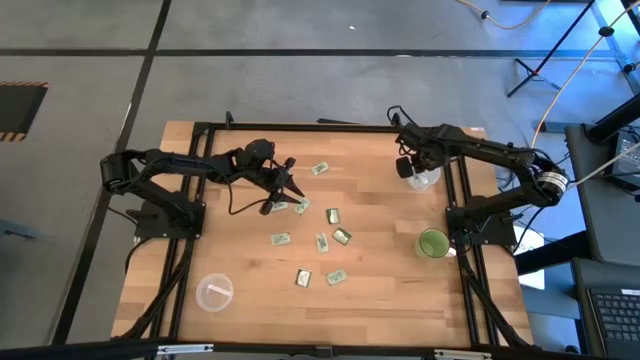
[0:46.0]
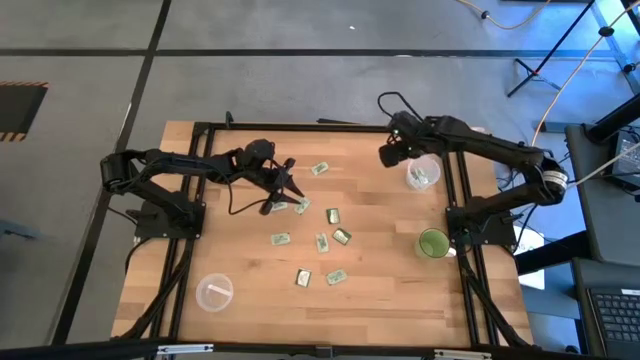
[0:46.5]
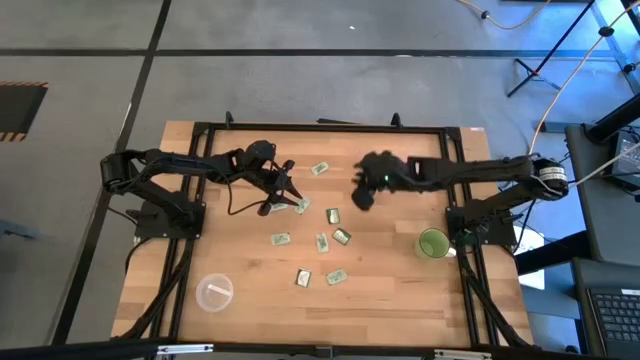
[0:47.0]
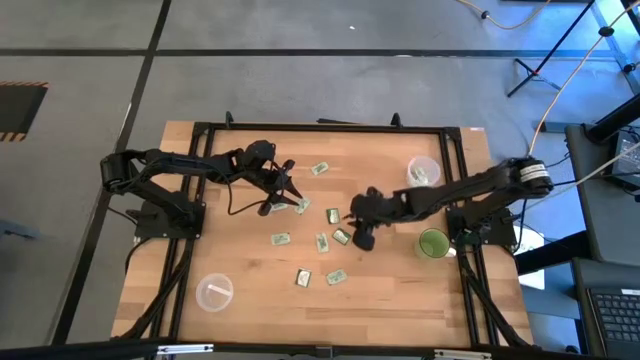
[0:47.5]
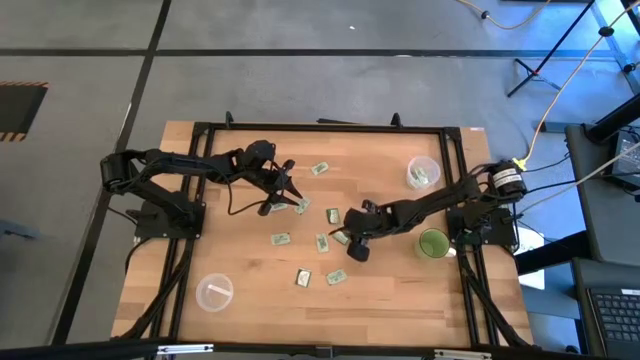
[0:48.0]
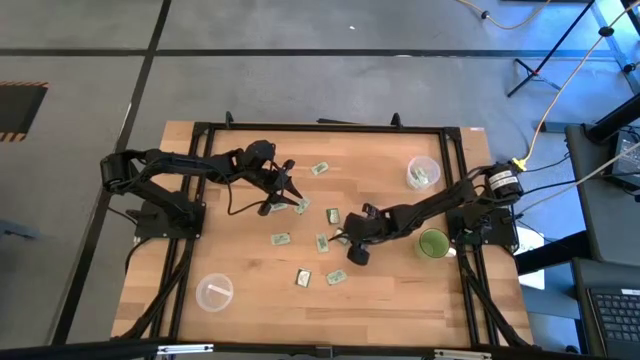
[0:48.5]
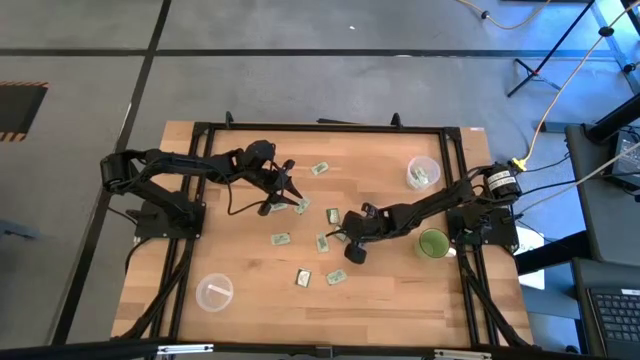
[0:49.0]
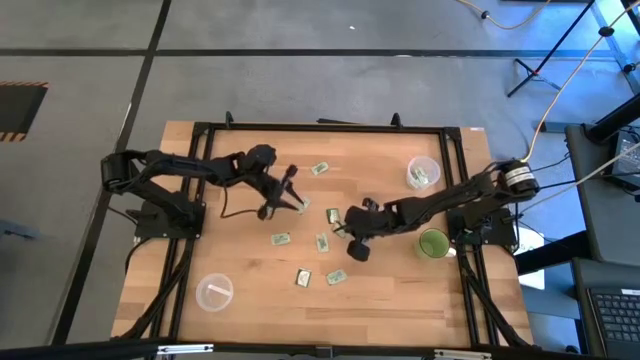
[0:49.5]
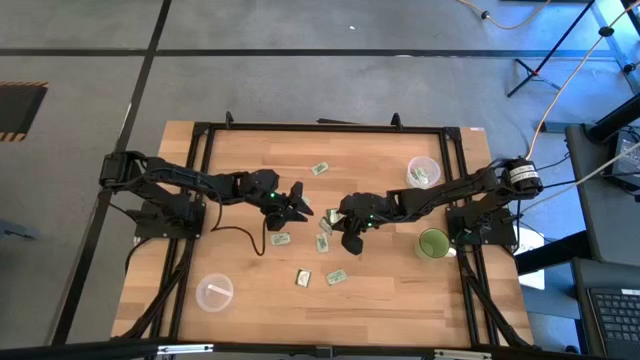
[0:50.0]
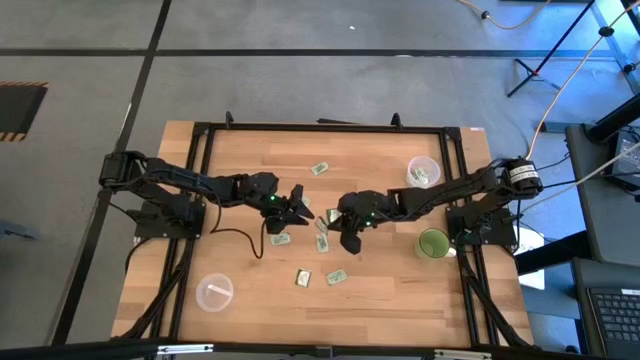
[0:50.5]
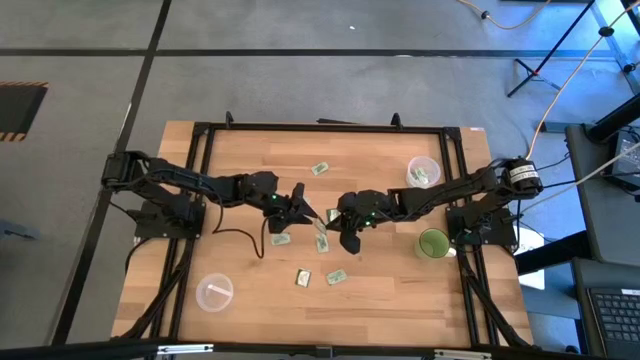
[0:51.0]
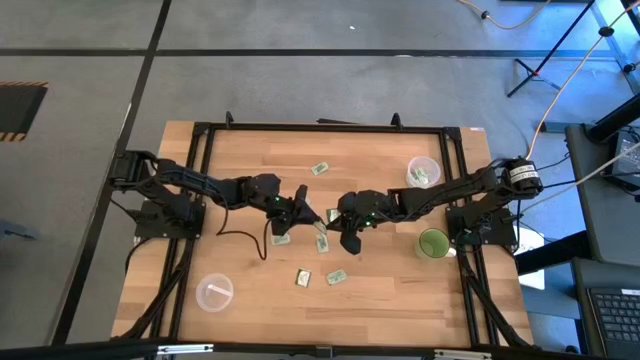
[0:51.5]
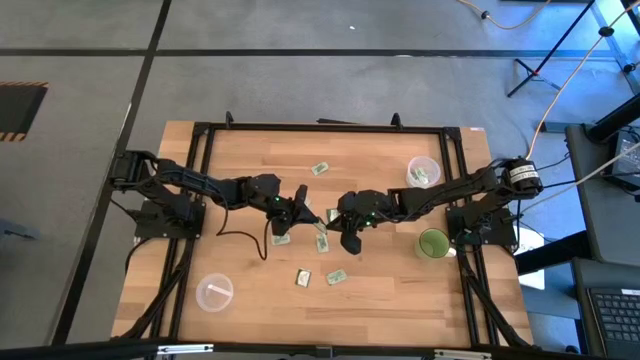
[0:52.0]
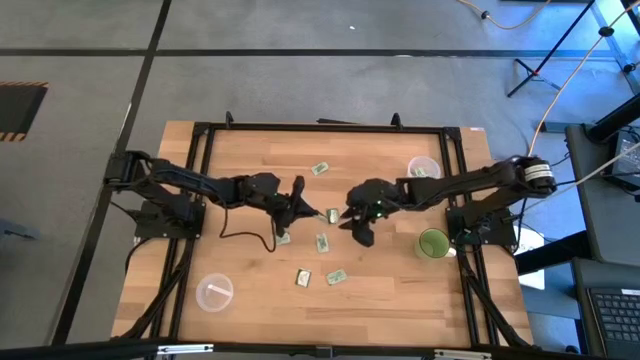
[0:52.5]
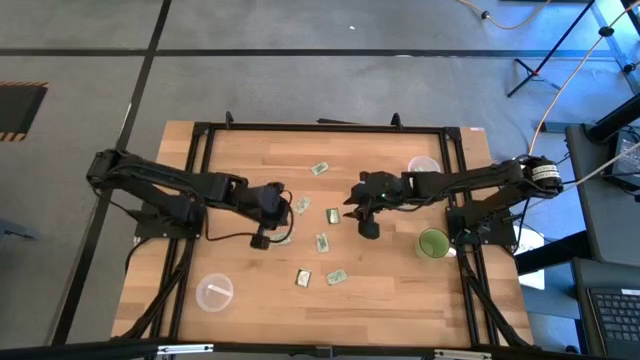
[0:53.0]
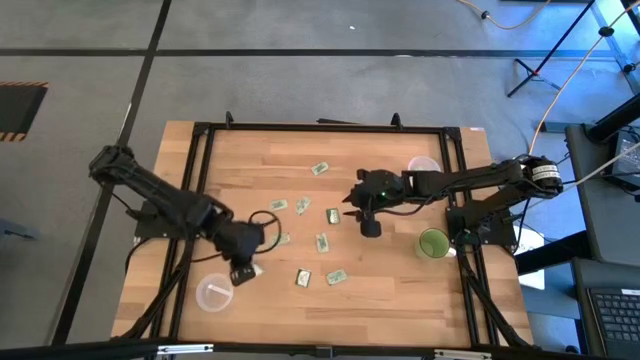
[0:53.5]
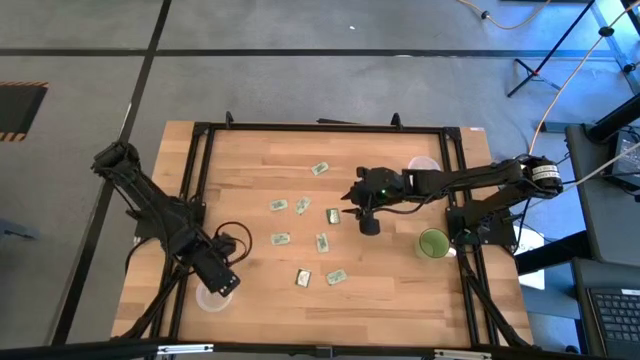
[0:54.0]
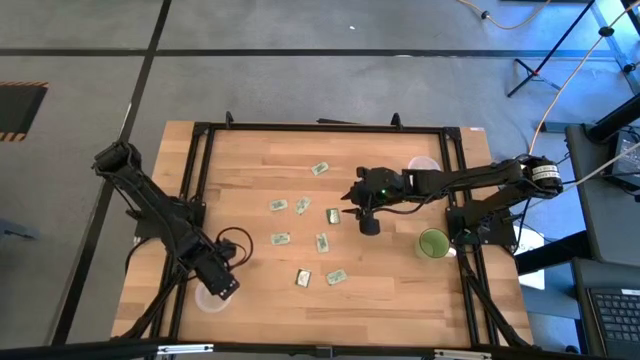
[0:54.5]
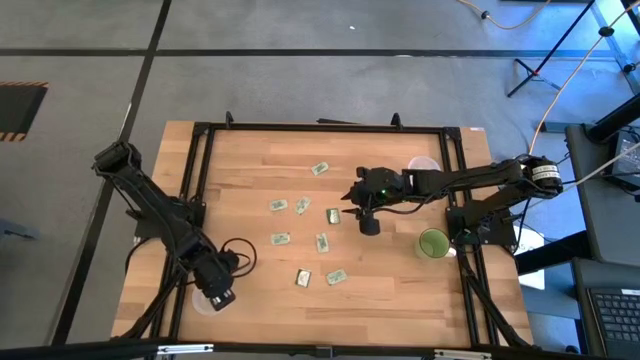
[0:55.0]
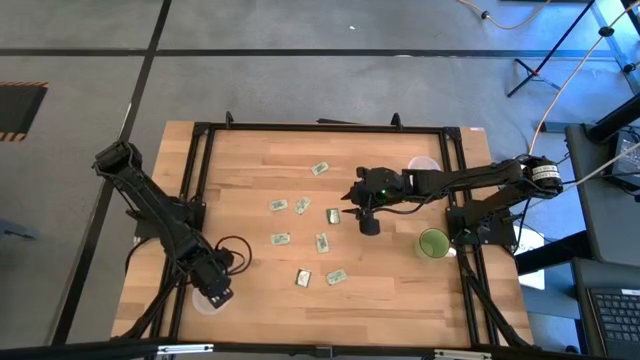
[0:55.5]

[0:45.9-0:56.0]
Task: Pick and place items into bin
Put the green stevia packet into the bottom white bin

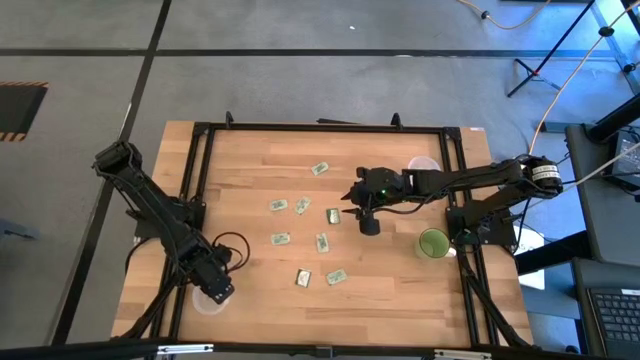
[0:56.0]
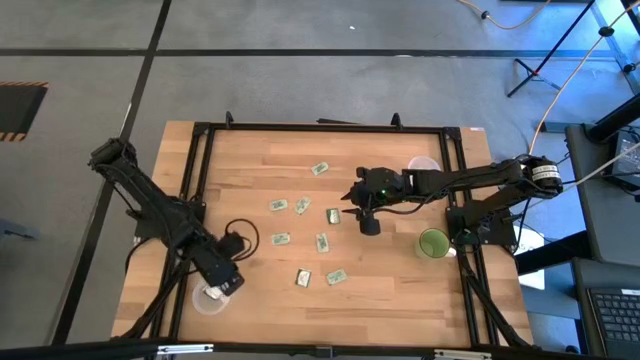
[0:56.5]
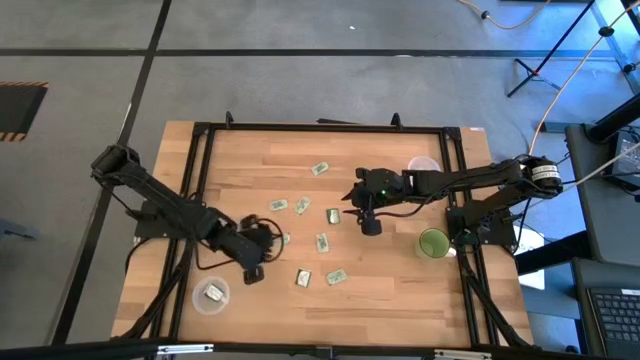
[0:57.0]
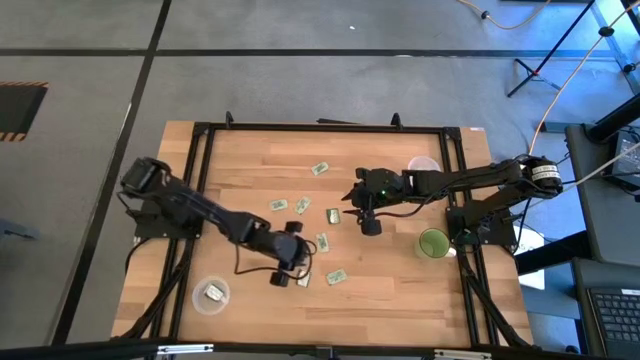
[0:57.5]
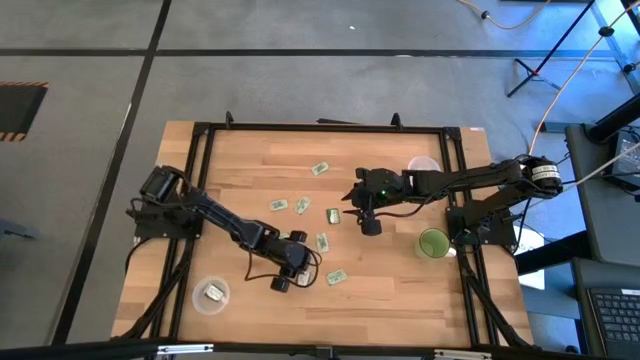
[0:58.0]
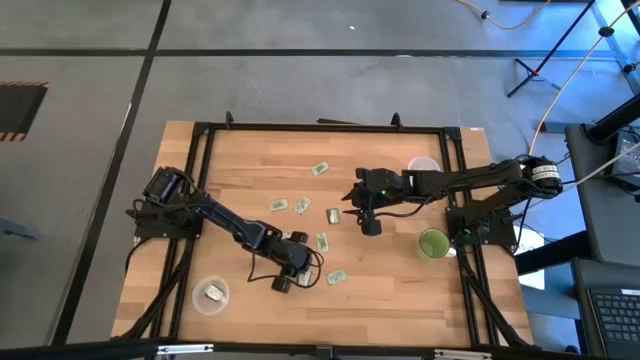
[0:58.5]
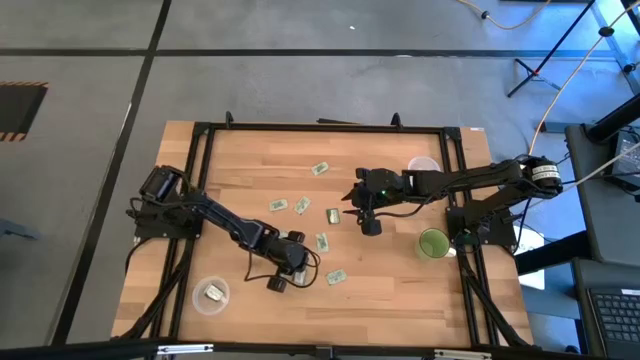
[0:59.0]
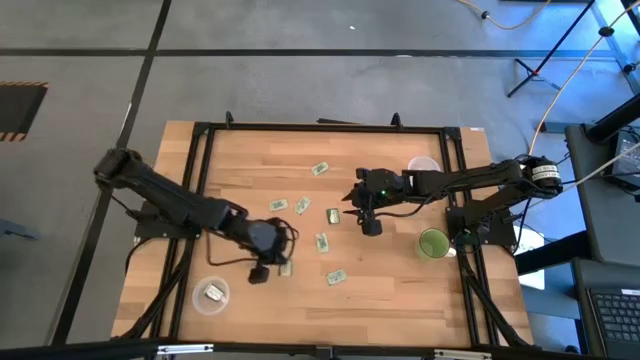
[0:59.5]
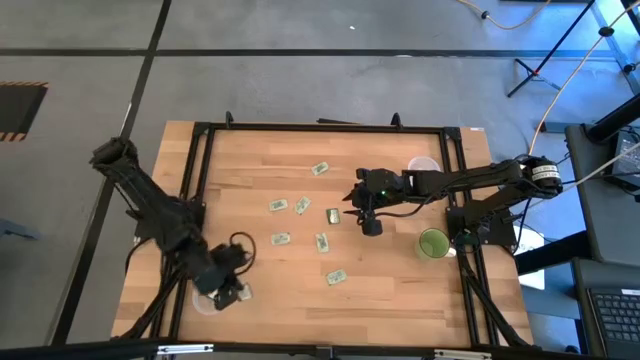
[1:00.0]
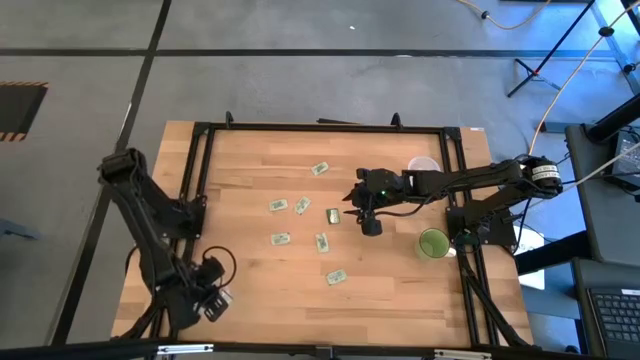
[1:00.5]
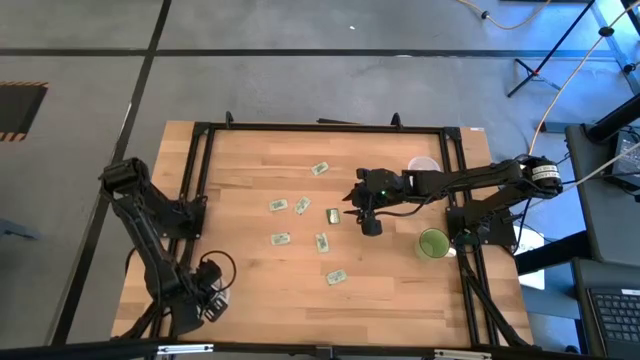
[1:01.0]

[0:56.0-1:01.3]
Put the green stevia packet into the bottom white bin

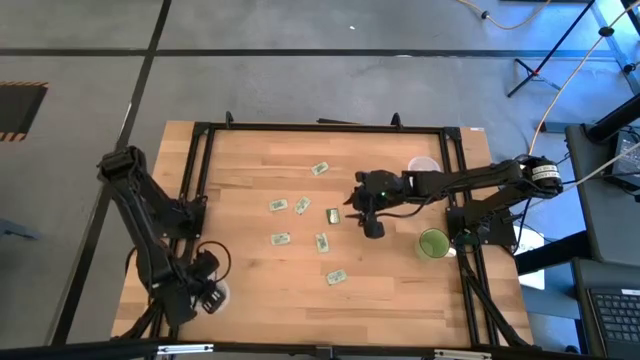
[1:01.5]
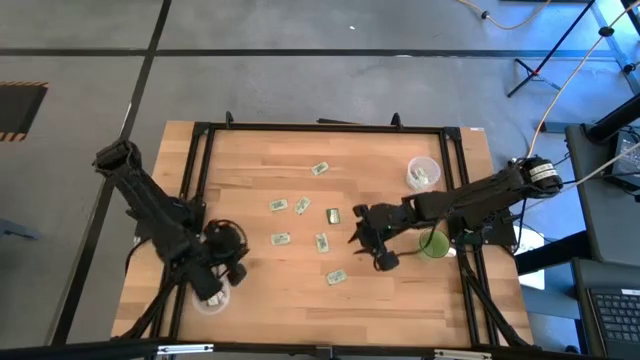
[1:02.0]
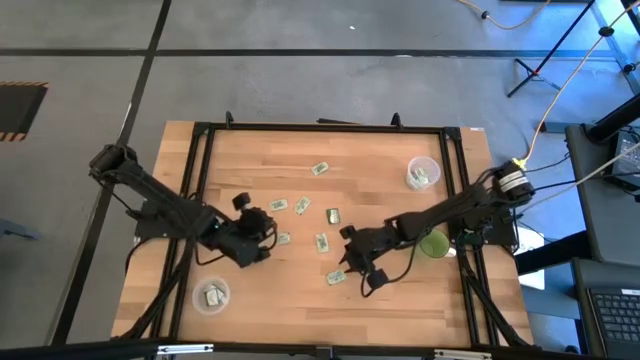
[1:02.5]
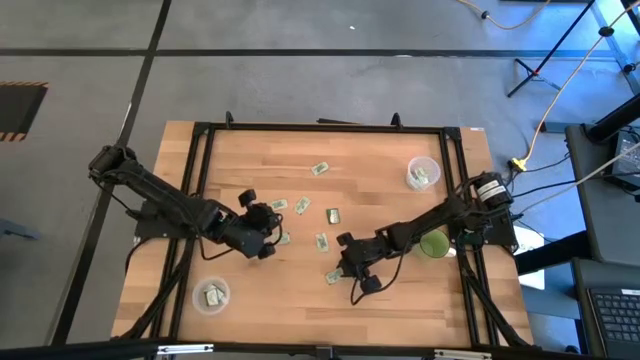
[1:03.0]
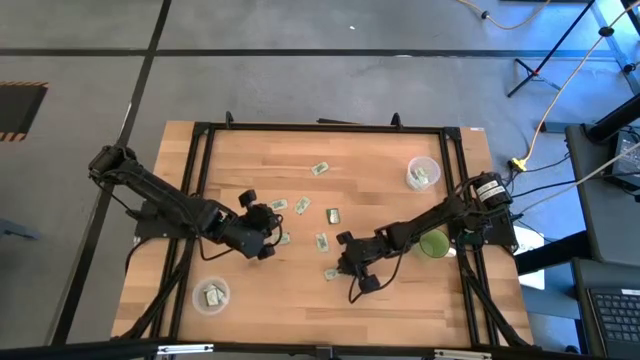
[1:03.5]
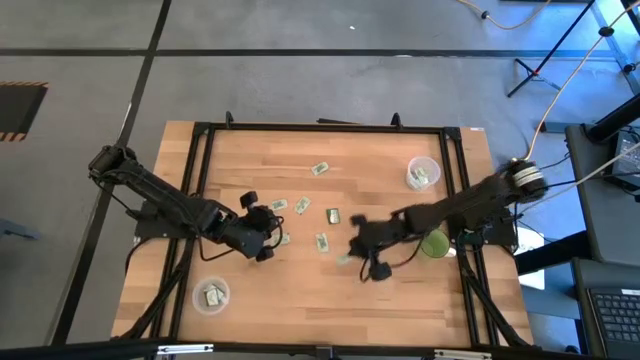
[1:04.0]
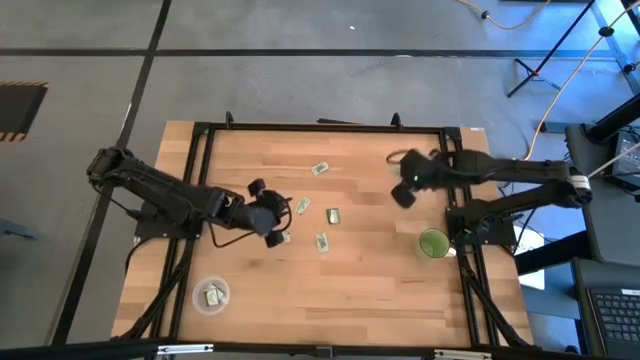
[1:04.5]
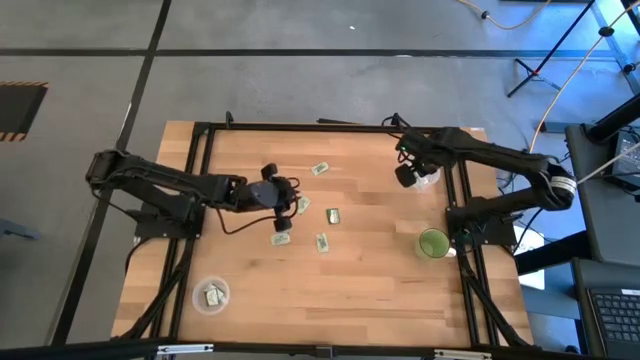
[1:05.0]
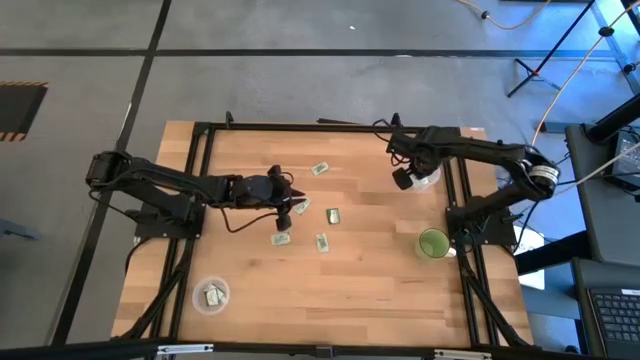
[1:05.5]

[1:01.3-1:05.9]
Put the white stevia packet into the top white bin

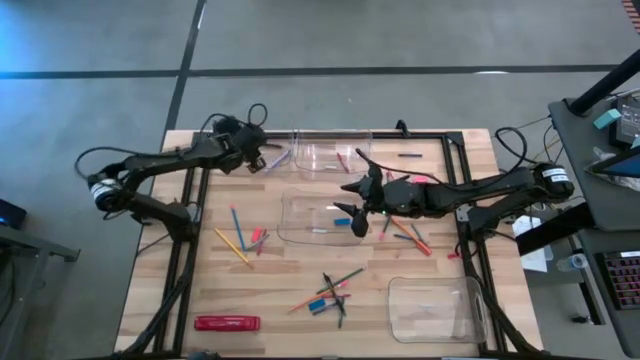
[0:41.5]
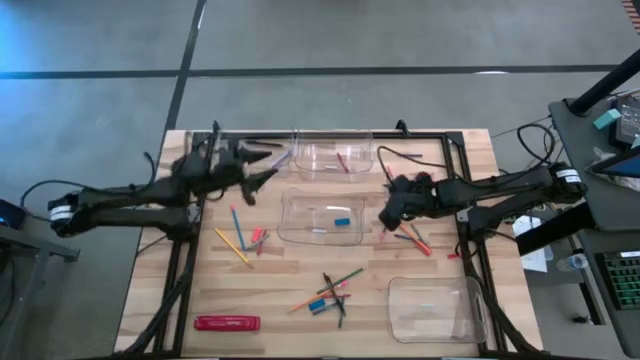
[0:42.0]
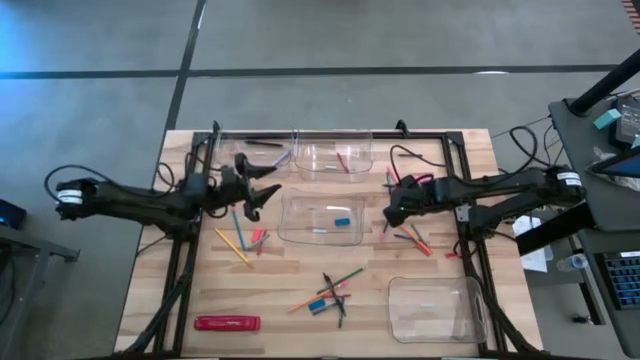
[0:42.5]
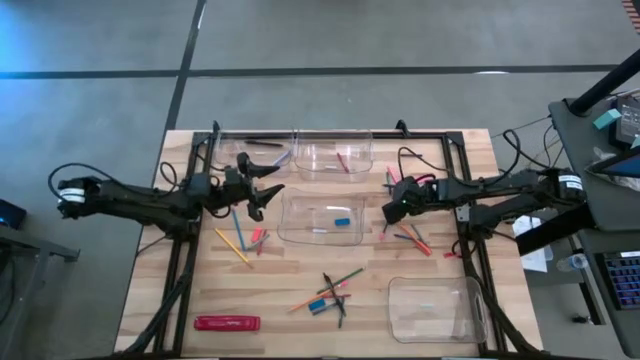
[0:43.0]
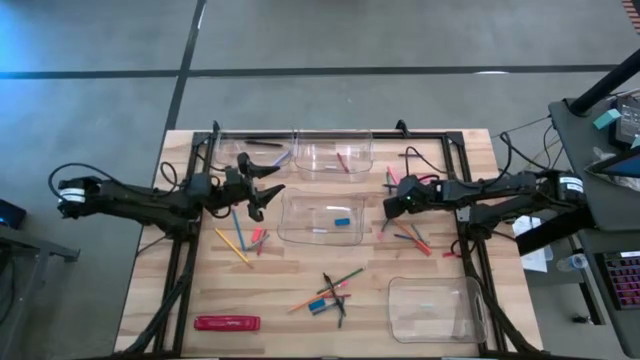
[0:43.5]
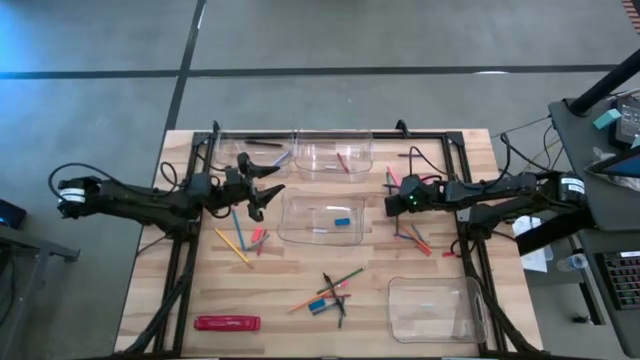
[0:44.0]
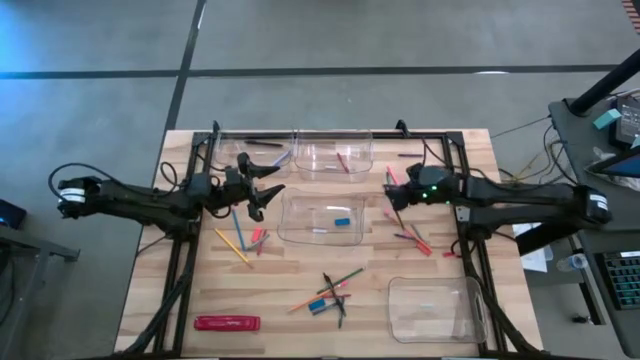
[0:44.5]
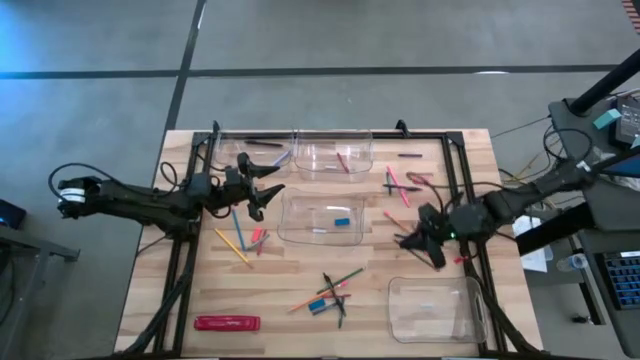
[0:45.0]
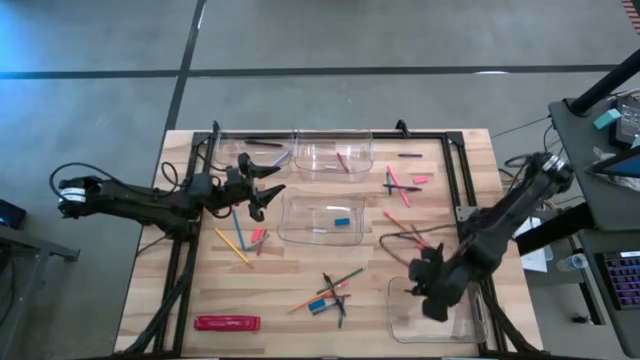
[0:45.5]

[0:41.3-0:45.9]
Task: Sort crayons/erasers/pens/pencils in bins
Put the green pencil into the bottom transparent bin
